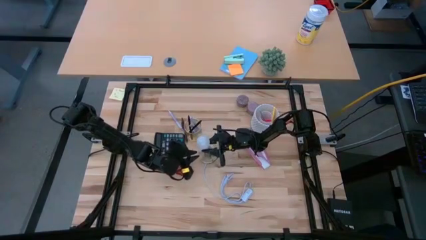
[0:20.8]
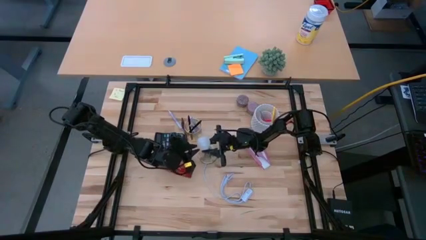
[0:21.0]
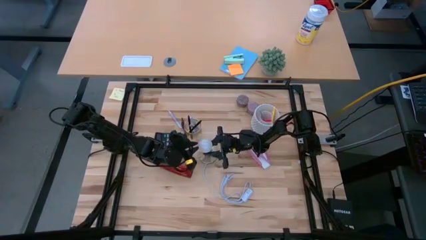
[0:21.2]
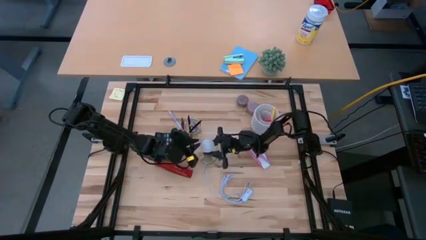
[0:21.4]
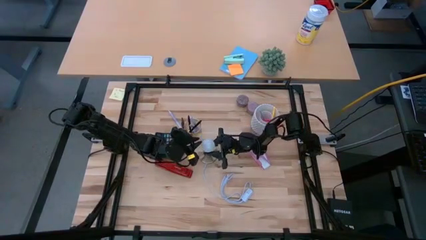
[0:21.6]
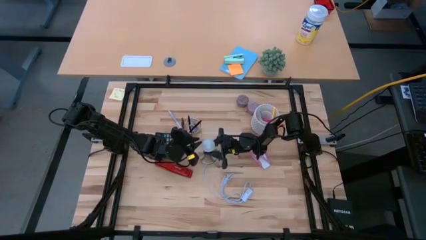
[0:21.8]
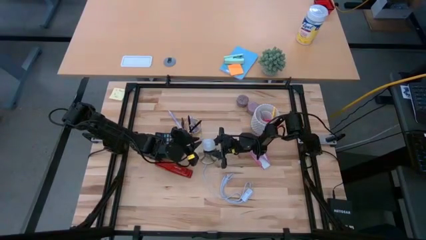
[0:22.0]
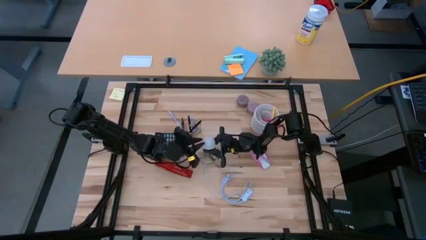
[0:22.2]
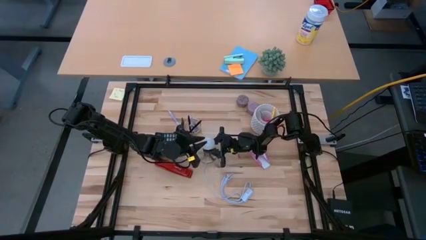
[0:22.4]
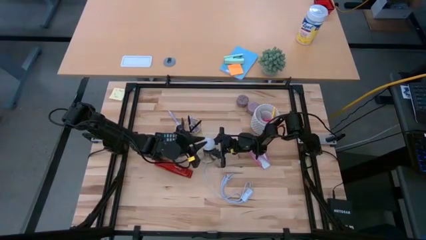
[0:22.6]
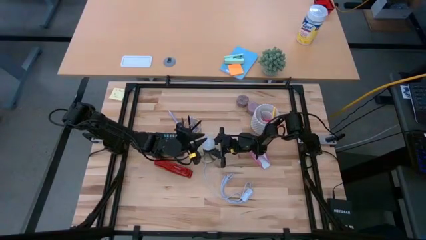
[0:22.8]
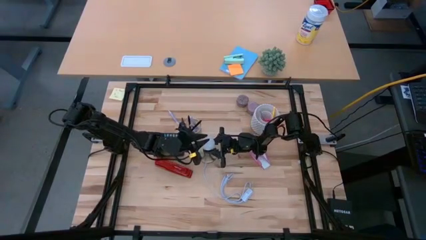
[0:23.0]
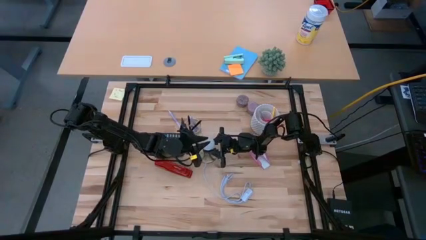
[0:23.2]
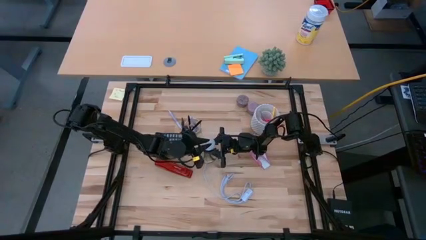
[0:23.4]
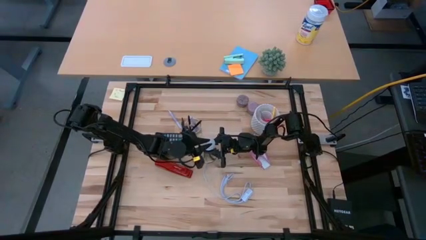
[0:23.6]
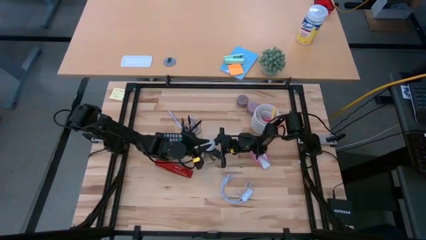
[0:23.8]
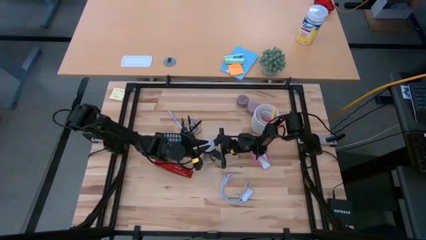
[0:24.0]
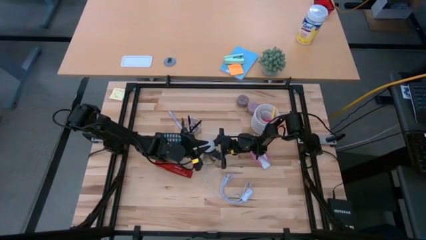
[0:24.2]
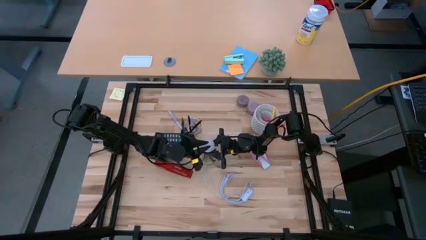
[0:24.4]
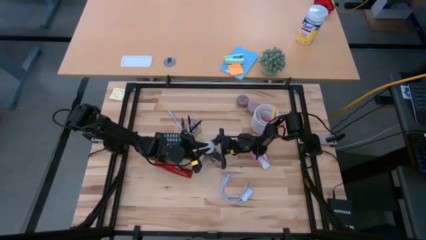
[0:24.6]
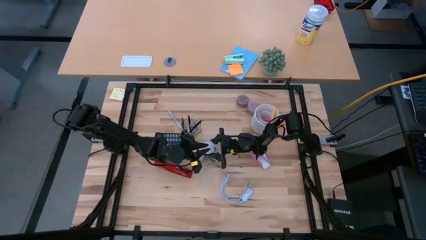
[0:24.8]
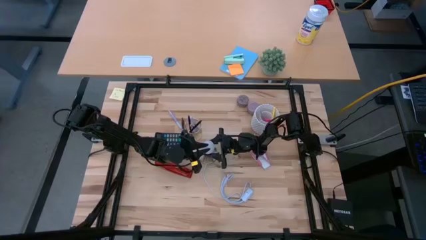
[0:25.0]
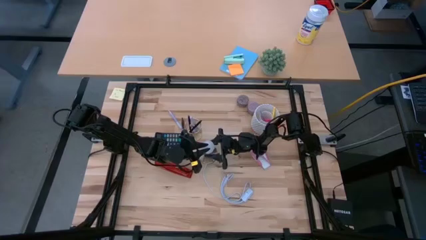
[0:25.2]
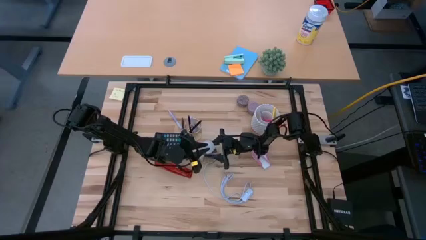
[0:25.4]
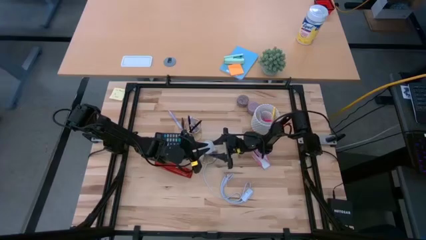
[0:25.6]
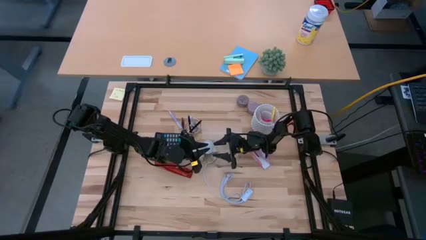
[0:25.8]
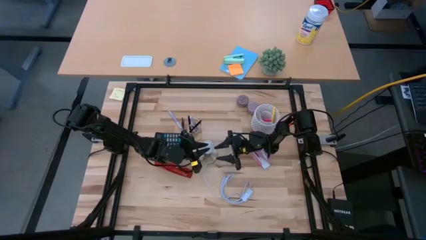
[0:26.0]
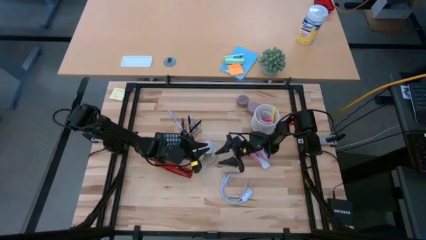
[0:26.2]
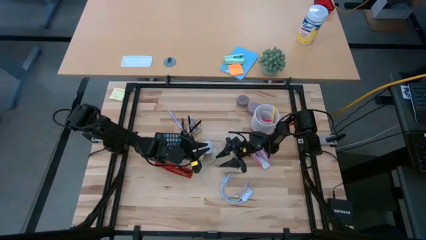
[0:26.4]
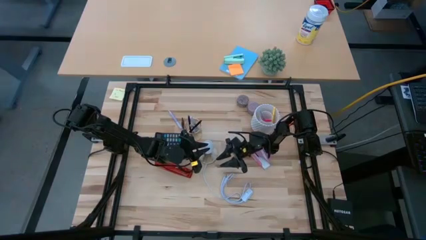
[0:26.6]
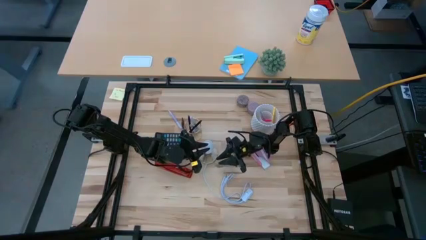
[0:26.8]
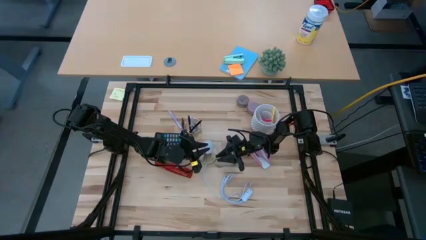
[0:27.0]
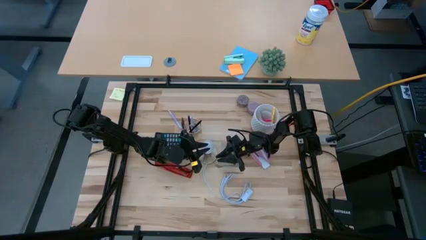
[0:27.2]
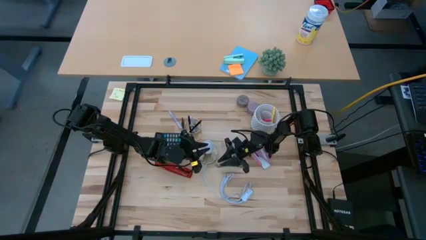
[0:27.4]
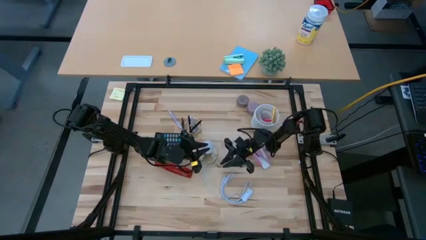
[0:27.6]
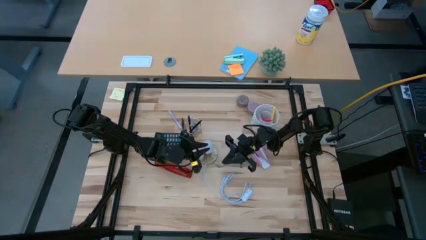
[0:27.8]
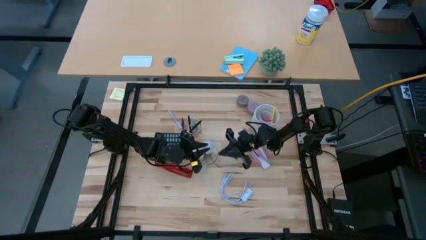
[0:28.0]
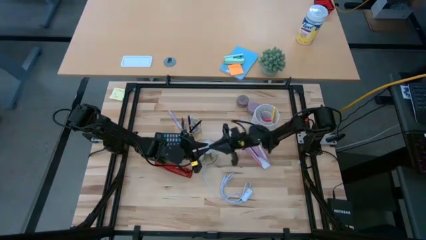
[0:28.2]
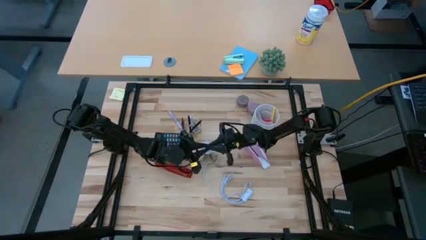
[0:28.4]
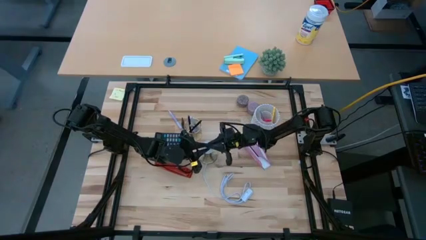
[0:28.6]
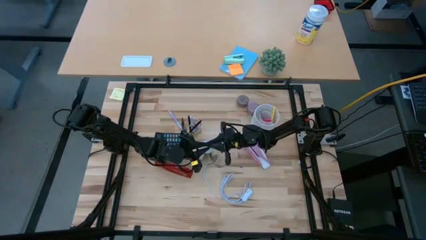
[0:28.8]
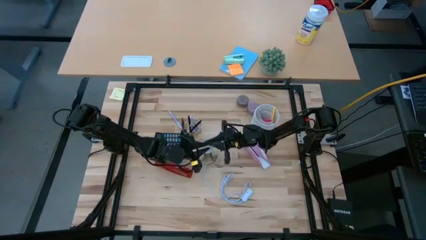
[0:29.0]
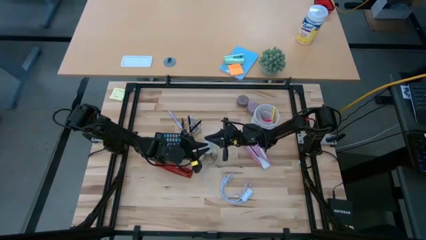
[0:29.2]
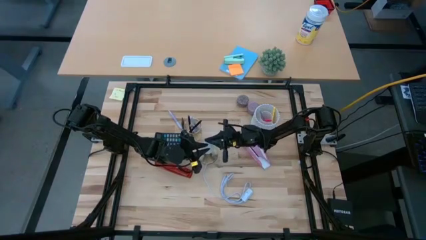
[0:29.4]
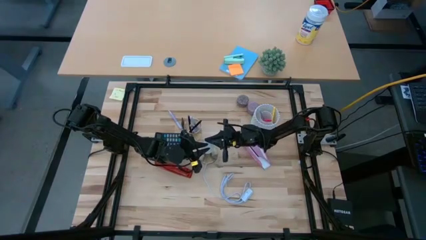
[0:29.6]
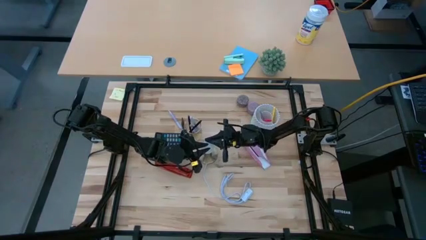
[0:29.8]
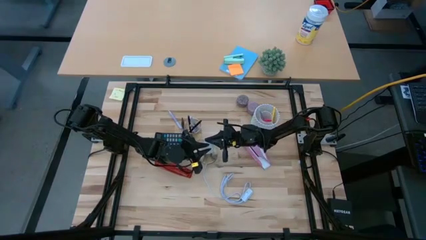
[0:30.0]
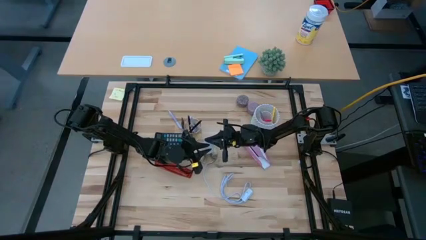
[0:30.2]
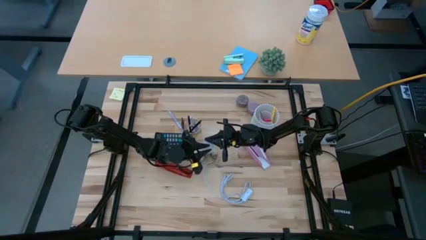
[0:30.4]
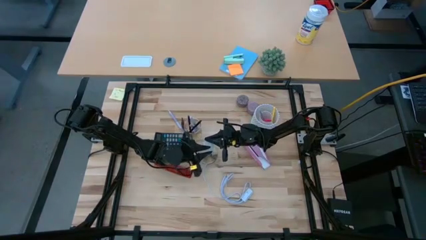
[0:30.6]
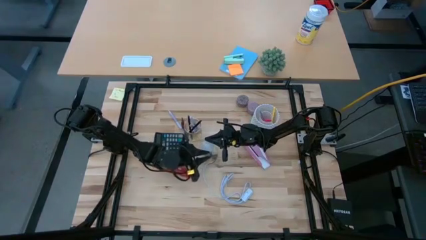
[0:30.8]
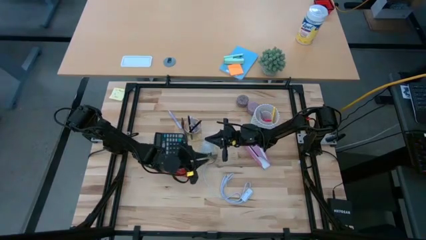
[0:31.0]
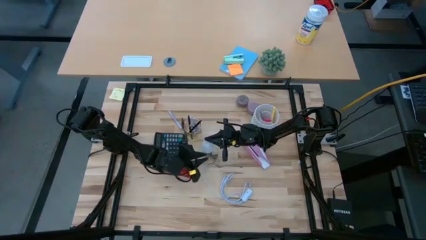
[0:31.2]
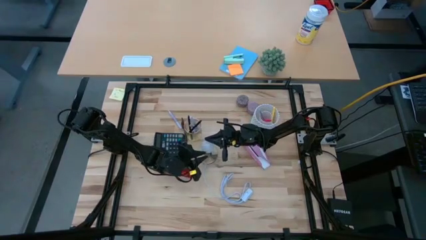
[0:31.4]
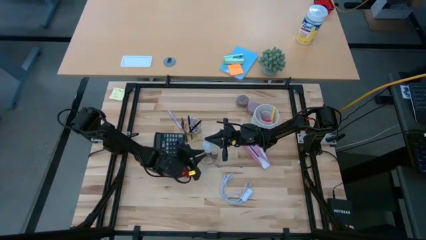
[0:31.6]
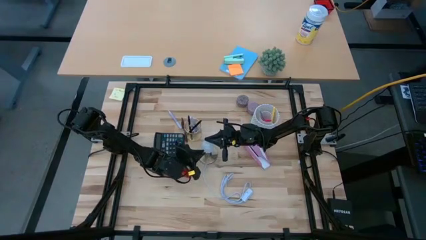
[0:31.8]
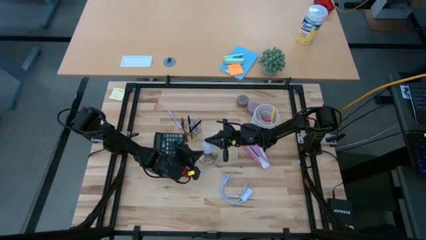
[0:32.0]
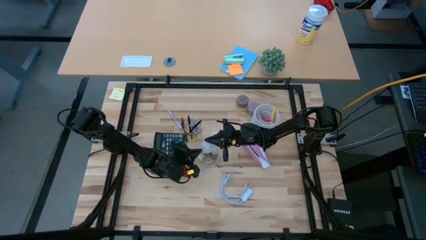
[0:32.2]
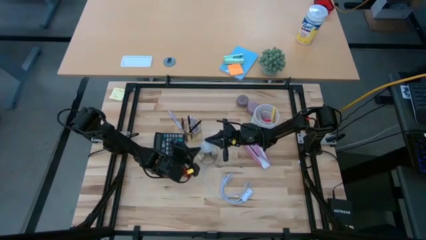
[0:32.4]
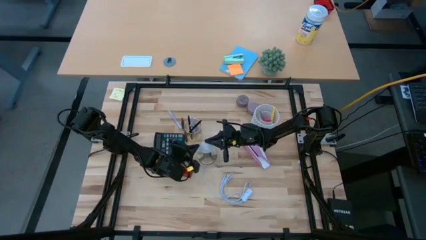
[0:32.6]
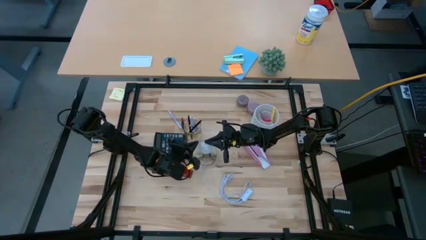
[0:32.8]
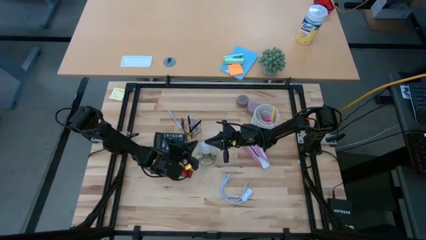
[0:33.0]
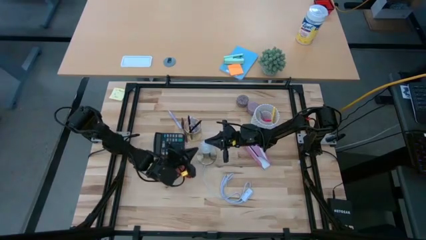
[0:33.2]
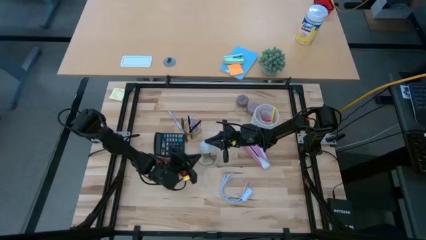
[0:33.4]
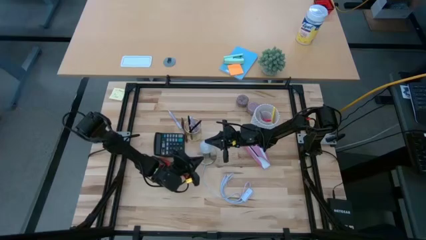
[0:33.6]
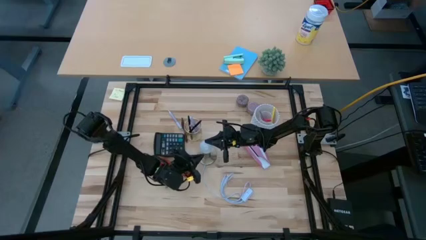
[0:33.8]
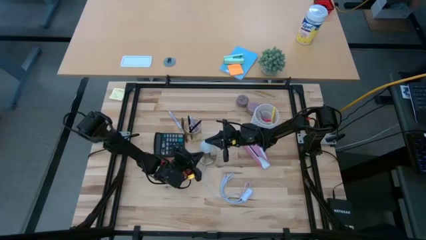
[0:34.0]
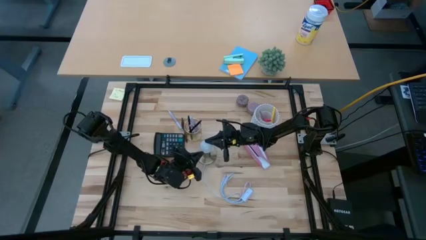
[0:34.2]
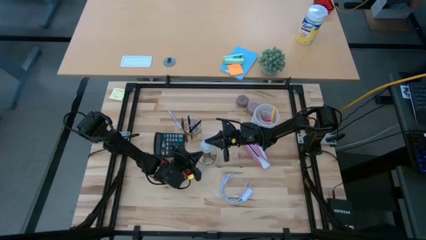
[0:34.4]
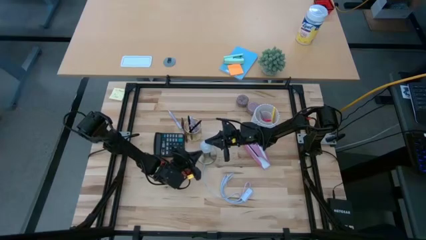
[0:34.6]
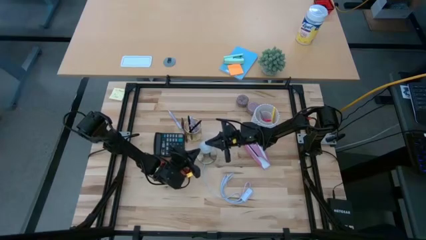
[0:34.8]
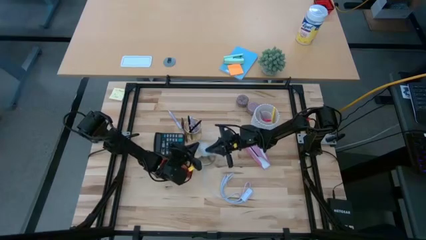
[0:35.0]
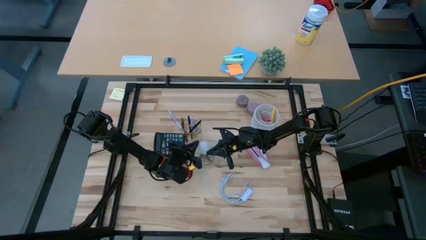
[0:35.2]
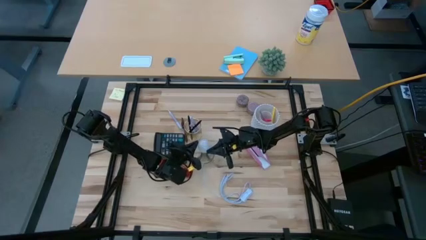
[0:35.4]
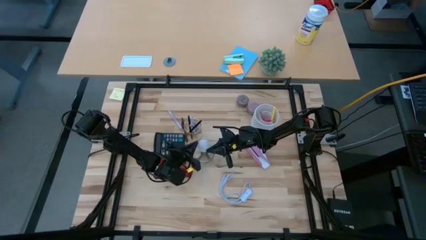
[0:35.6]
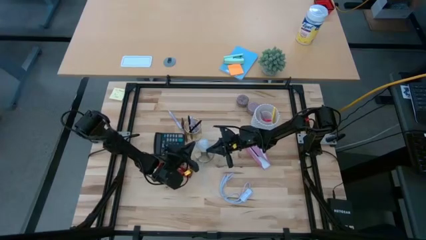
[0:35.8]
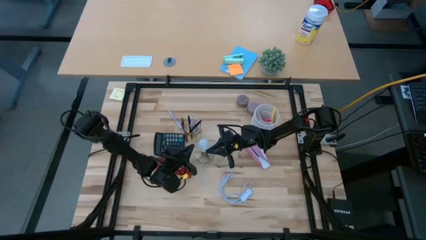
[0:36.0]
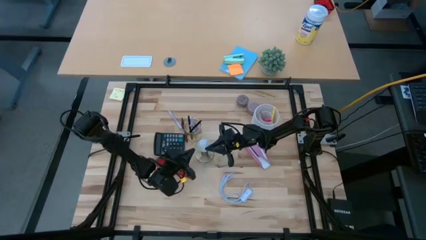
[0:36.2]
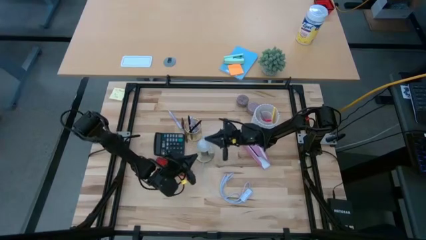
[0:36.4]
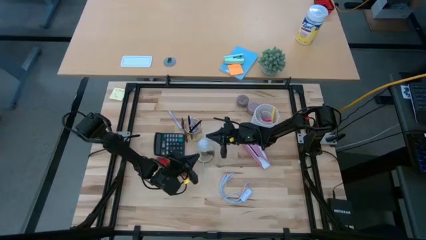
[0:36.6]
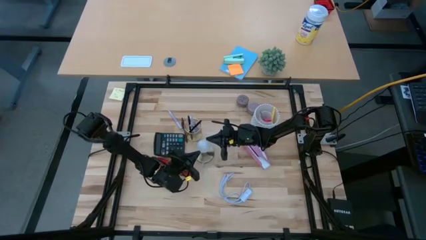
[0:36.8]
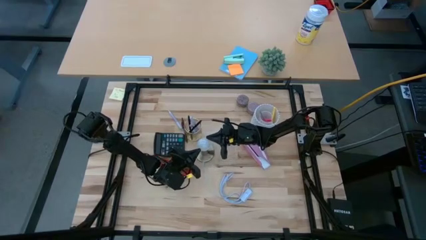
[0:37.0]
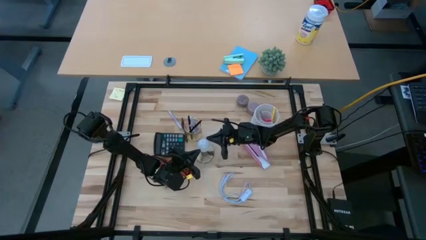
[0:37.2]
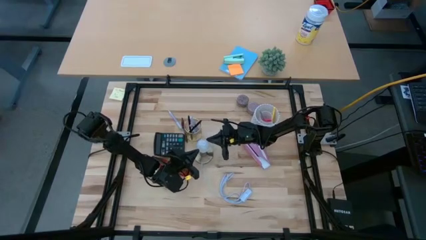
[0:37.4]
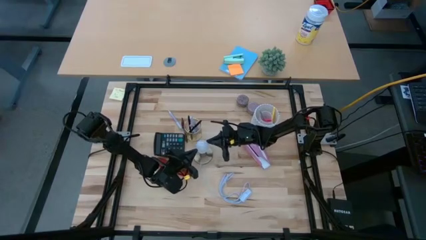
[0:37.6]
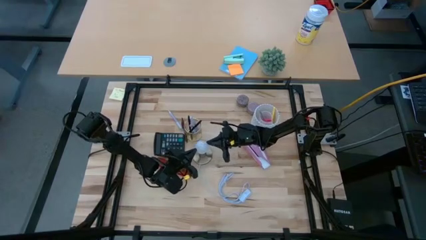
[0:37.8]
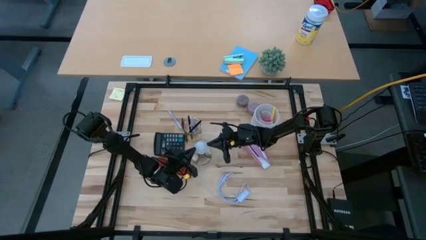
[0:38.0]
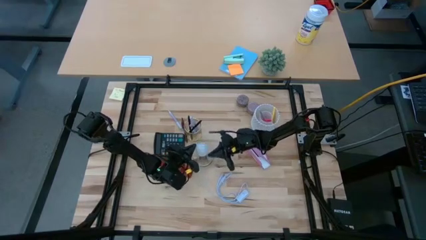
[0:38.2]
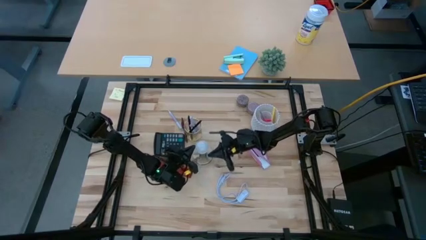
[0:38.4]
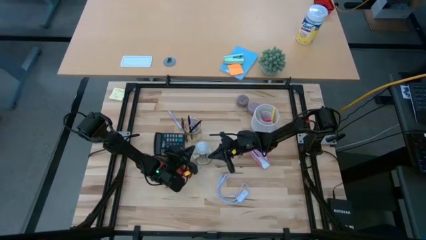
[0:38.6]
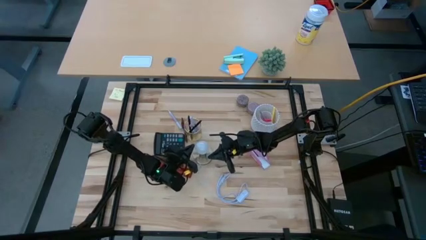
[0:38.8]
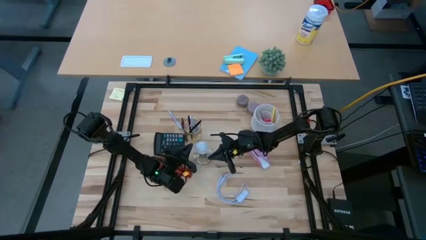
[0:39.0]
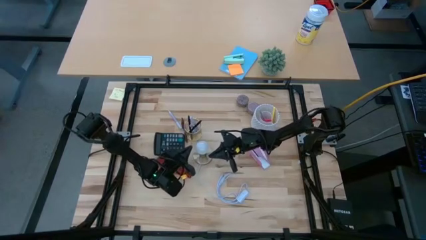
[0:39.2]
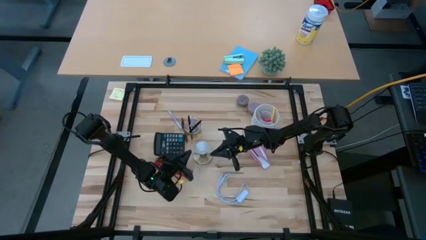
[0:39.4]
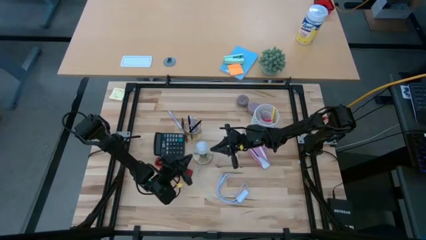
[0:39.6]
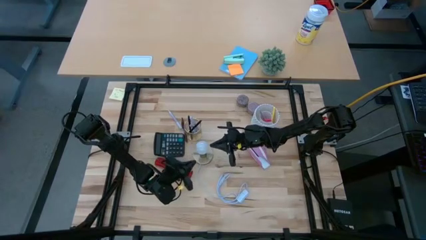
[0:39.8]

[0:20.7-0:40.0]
Task: Screw lightbulb
Insert the white lightbulb into the gold lamp
